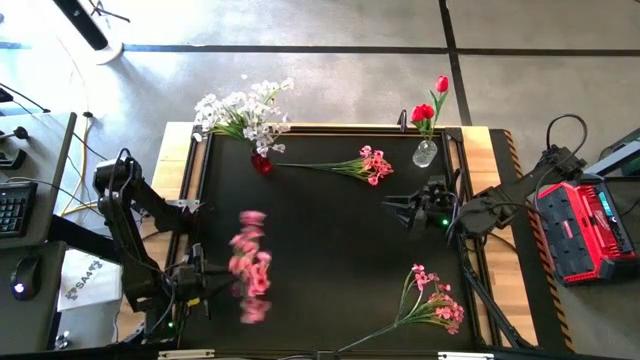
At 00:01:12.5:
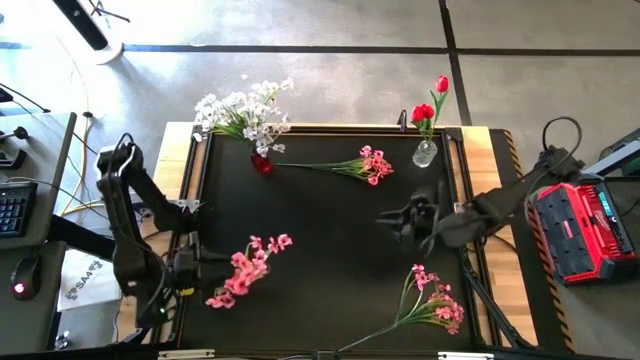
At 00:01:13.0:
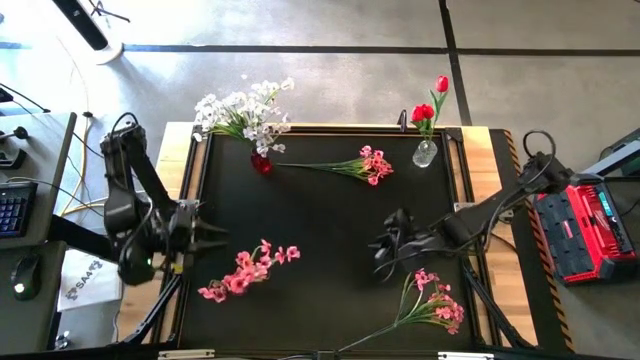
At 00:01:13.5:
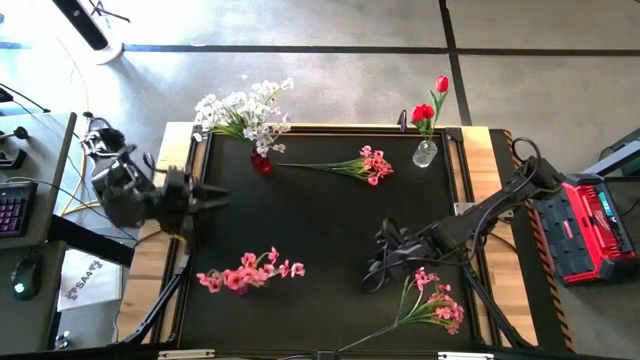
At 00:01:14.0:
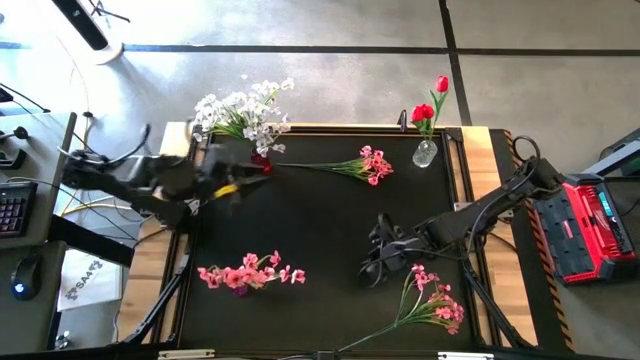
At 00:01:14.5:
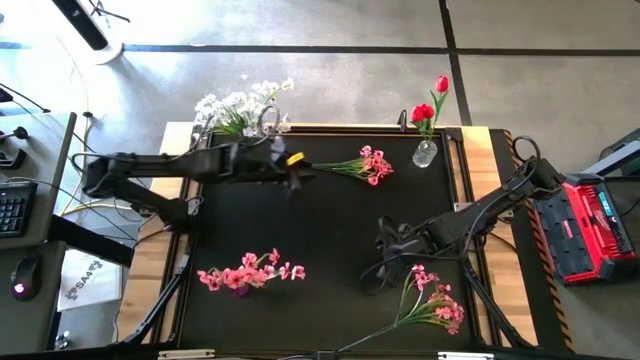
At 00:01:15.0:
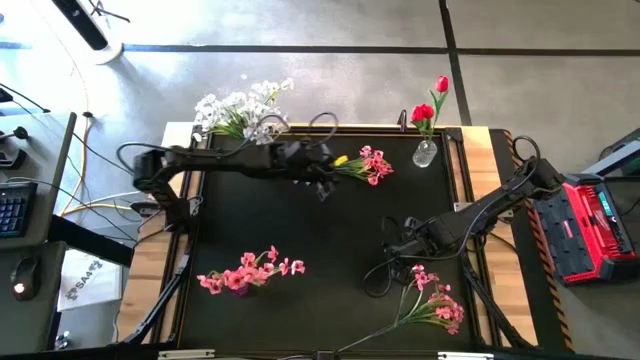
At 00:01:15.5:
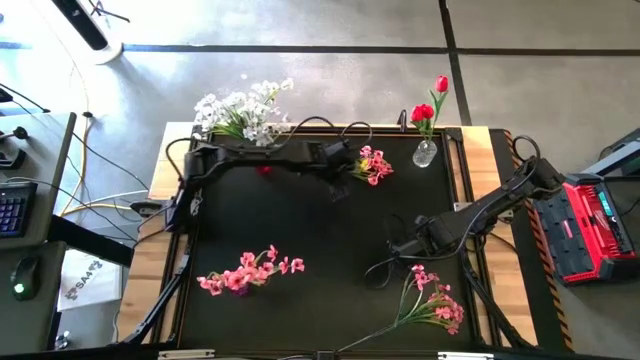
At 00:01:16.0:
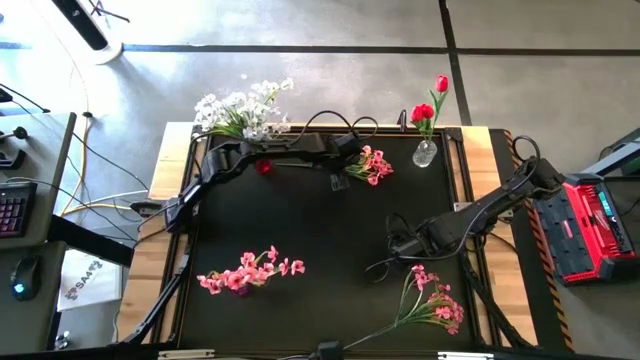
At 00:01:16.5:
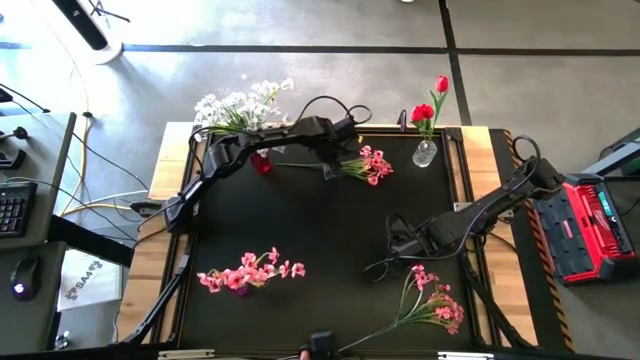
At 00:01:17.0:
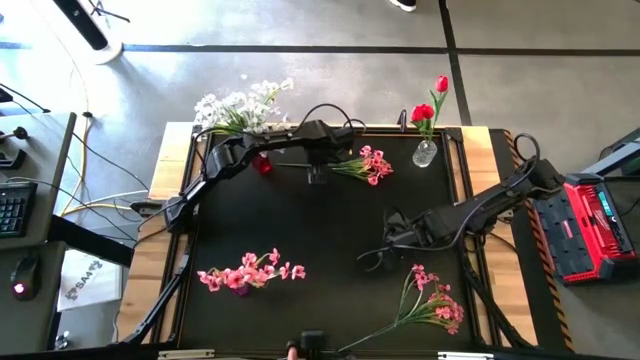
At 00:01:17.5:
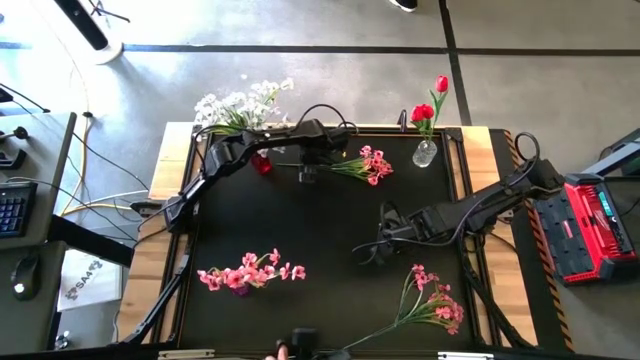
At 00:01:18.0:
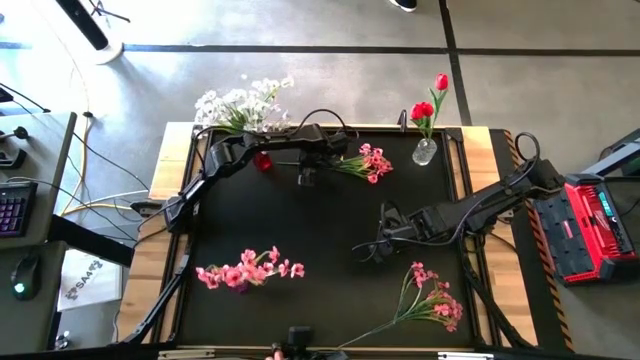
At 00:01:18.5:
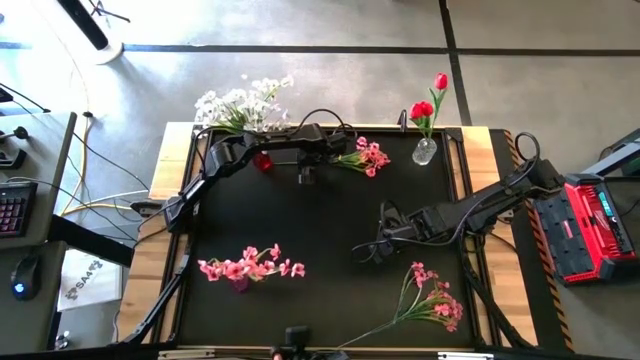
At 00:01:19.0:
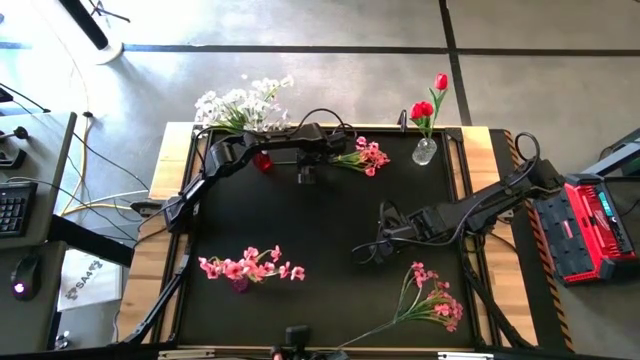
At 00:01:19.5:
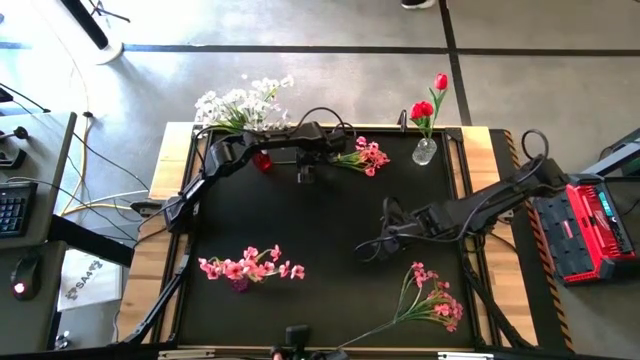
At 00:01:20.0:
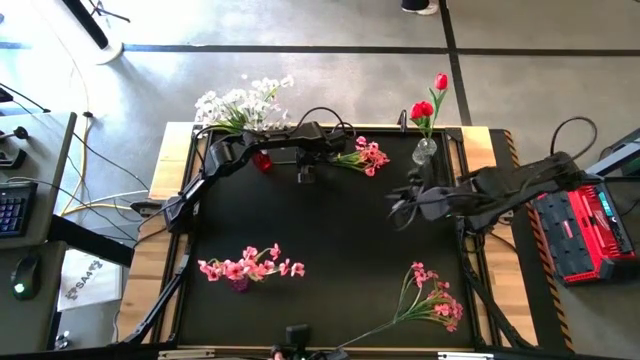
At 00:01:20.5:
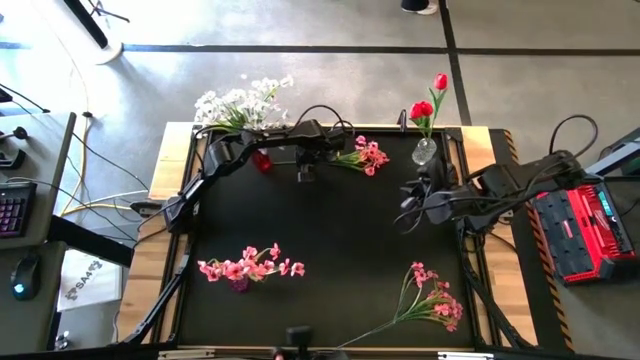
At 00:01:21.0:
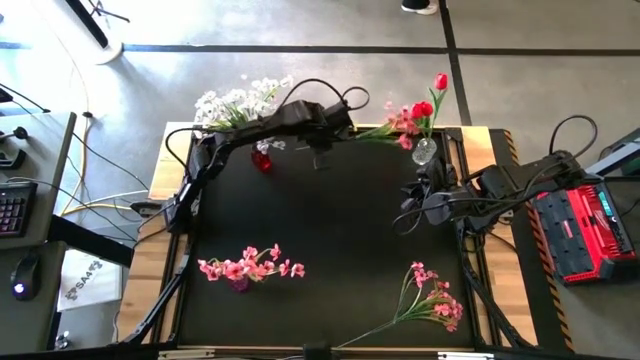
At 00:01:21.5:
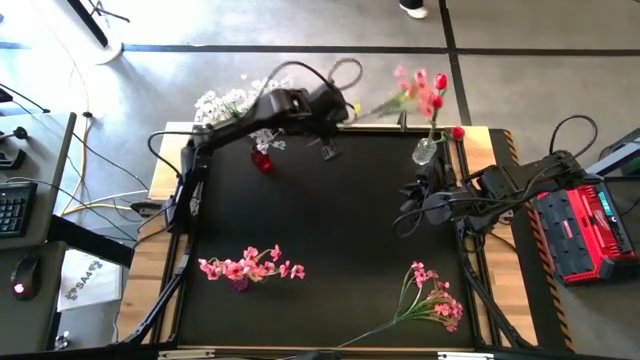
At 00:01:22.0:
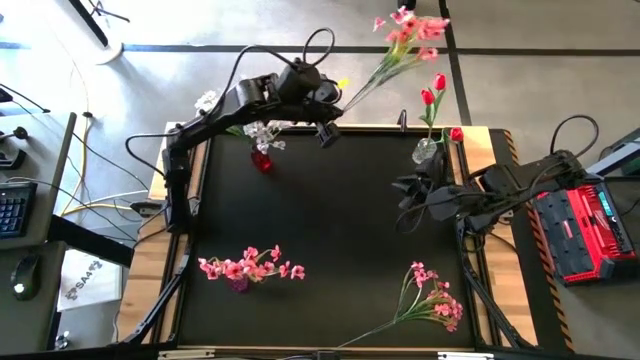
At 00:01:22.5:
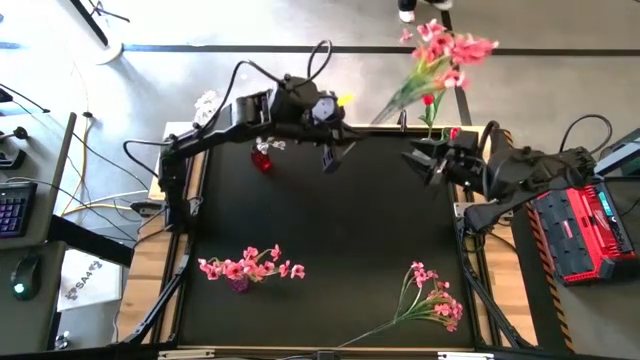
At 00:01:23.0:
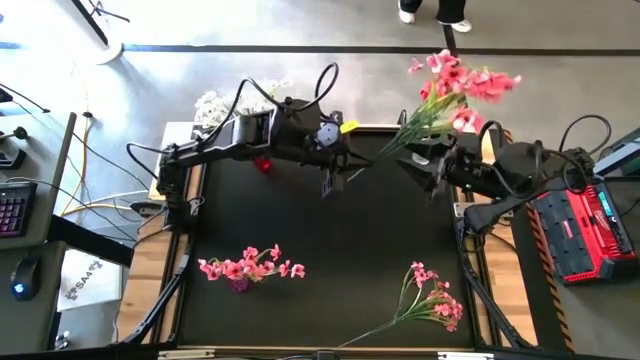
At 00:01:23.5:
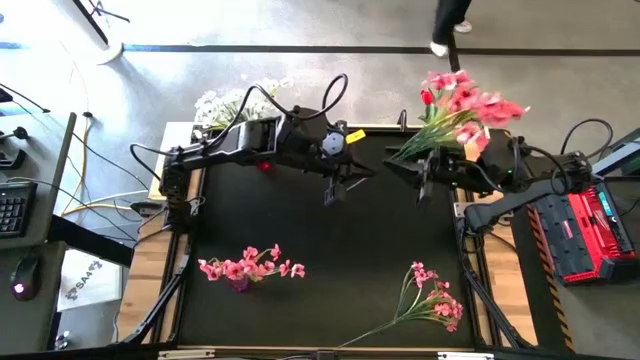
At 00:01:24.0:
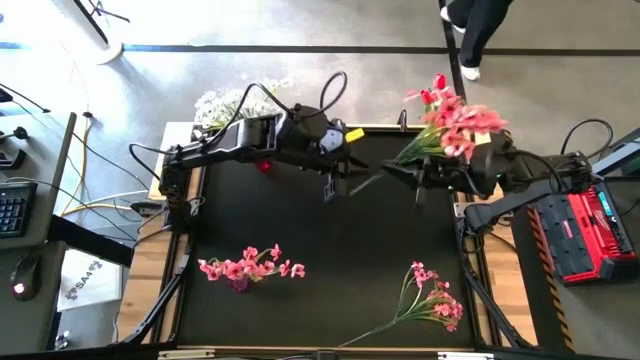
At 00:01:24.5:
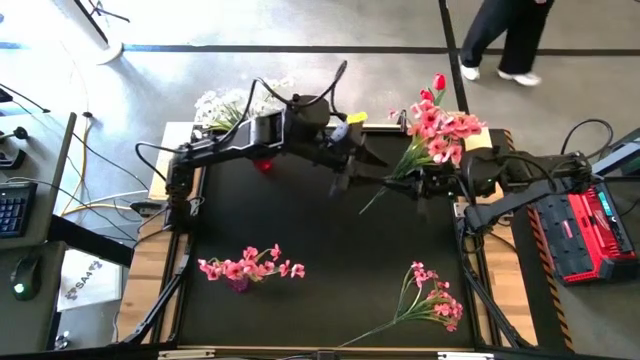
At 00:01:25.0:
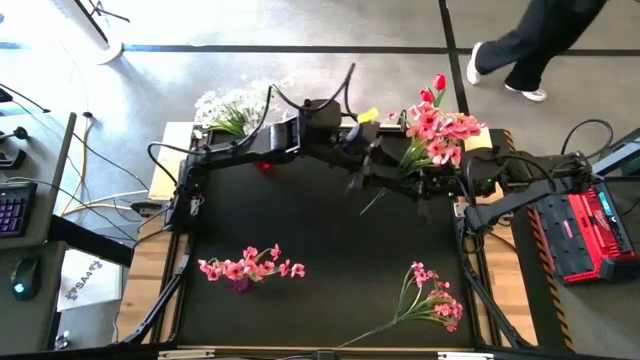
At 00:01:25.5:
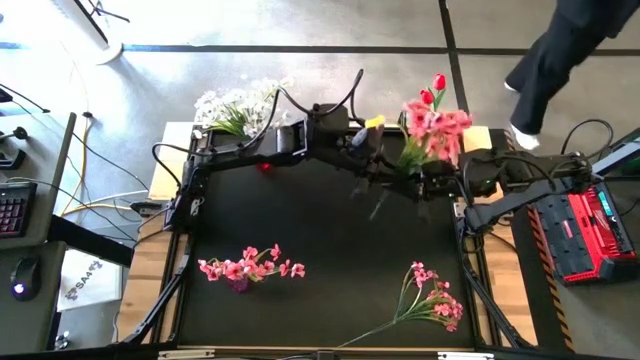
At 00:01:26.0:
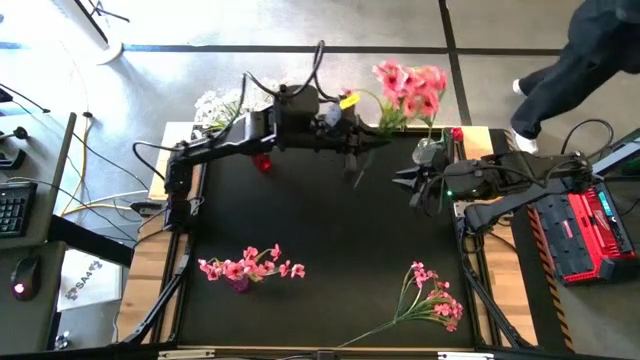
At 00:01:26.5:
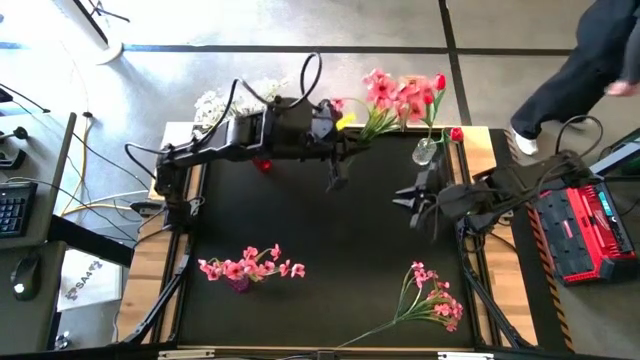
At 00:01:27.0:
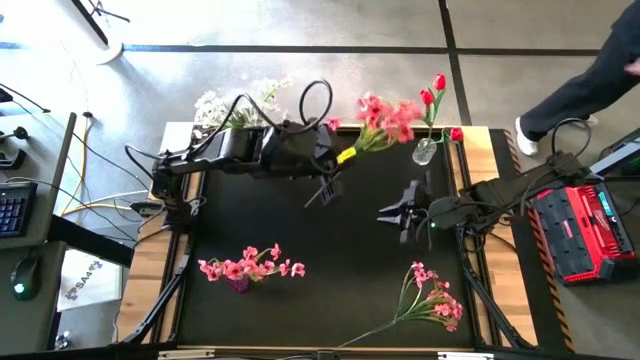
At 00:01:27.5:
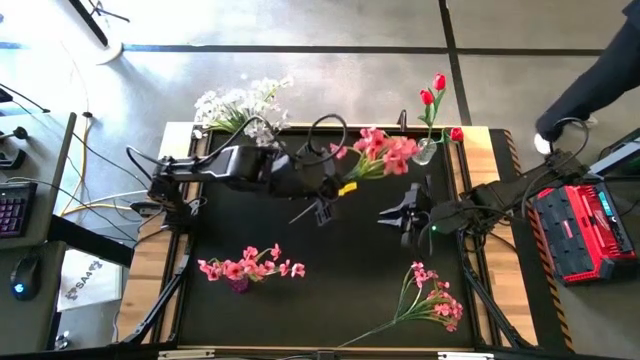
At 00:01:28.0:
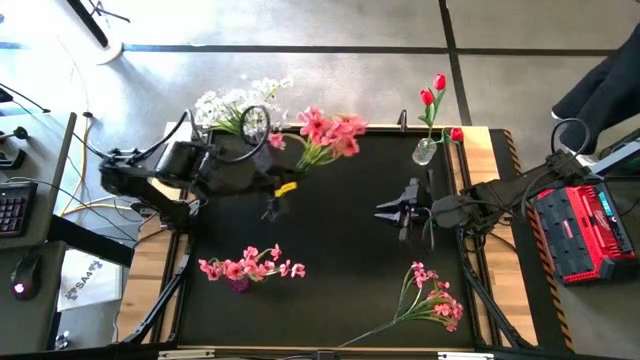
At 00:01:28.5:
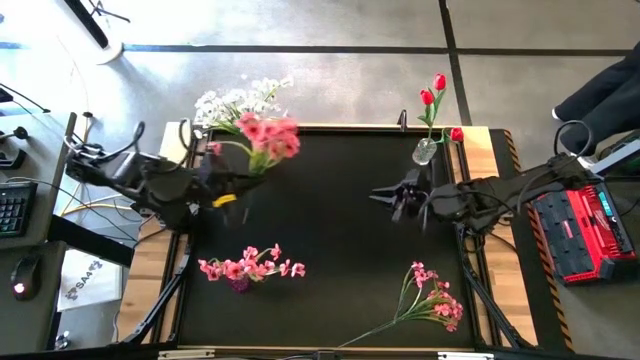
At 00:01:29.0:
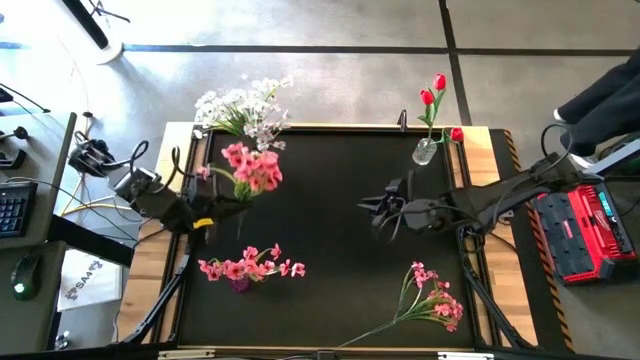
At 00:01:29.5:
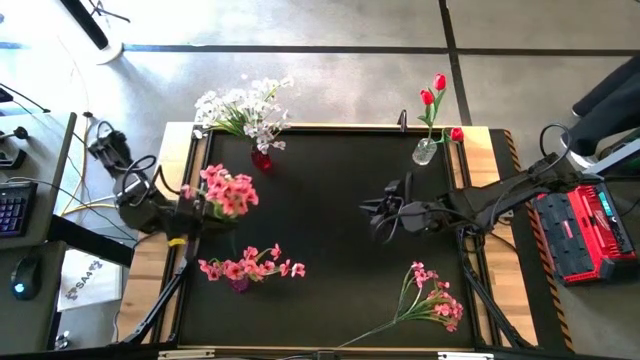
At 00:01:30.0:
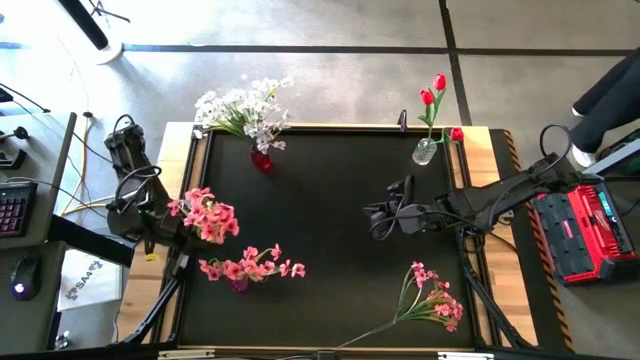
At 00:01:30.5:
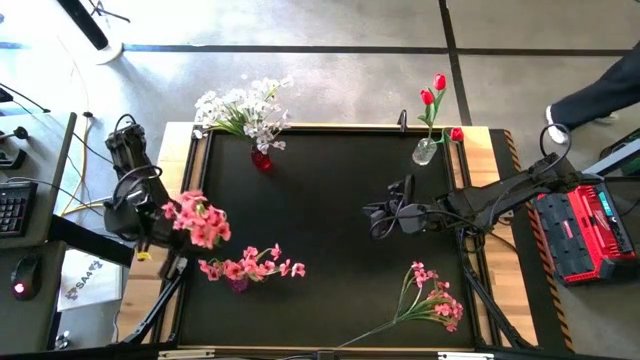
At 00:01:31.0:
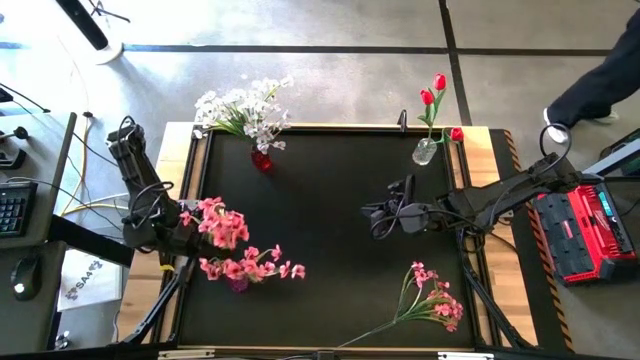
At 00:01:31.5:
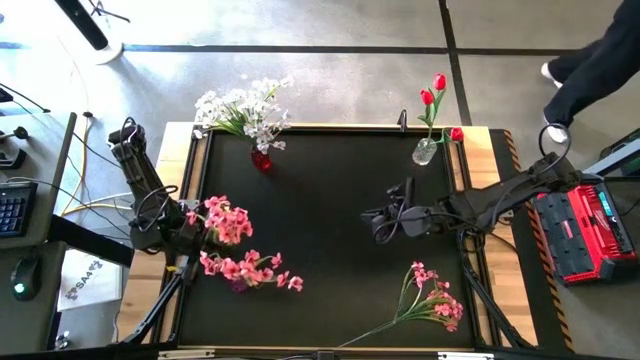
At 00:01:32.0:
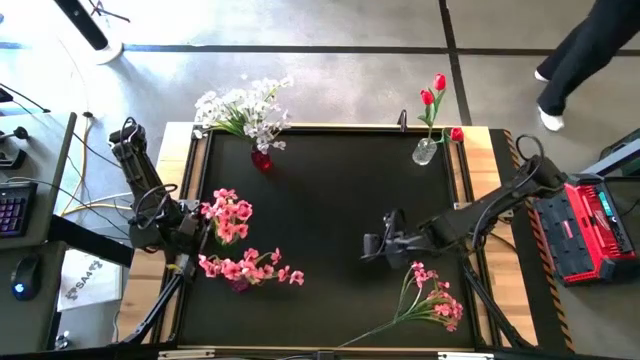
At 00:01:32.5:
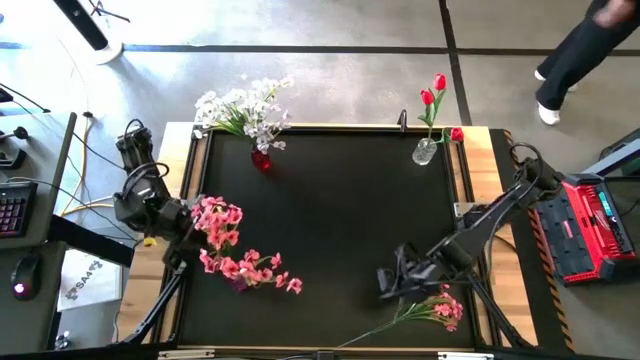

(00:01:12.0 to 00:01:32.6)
Task: Sort flowers into vase by color
Put the top pink flowers into the violet vase
